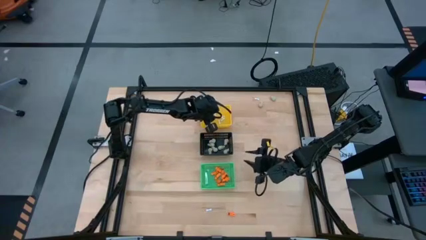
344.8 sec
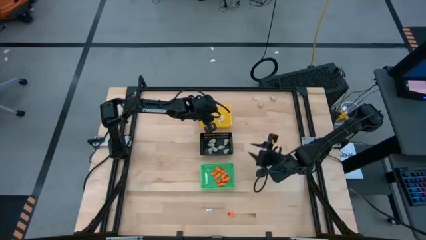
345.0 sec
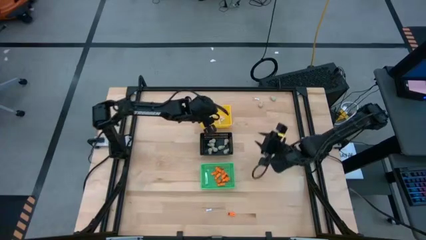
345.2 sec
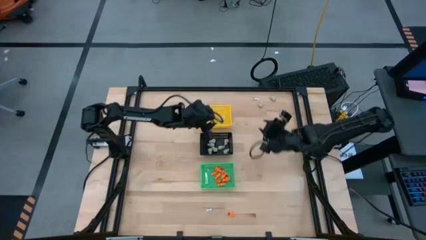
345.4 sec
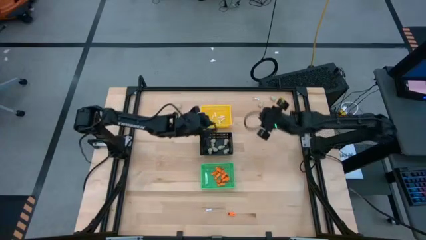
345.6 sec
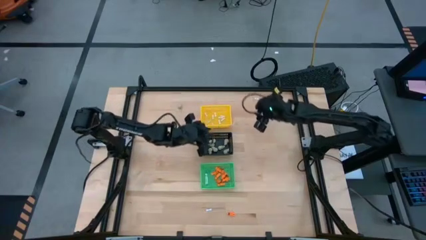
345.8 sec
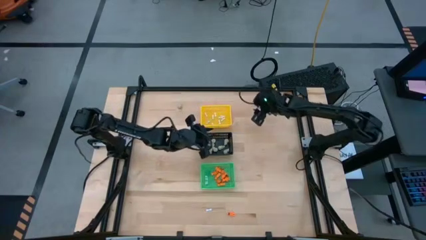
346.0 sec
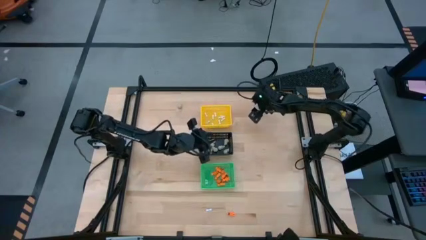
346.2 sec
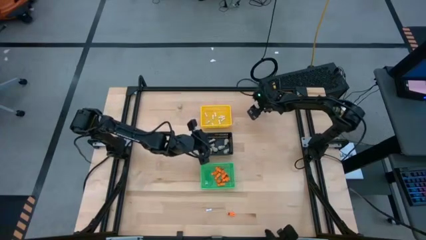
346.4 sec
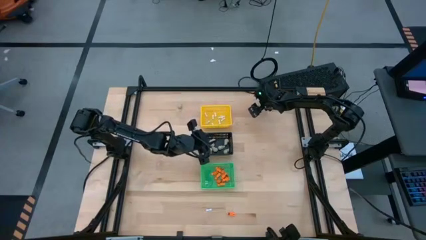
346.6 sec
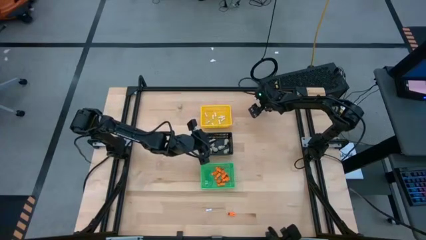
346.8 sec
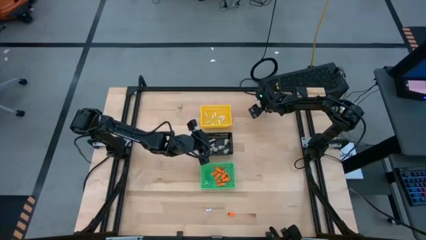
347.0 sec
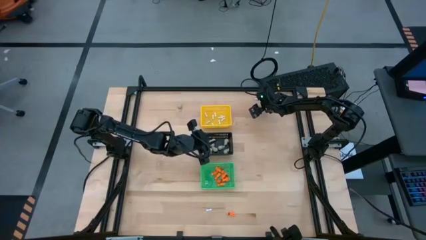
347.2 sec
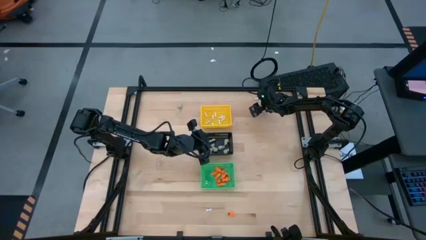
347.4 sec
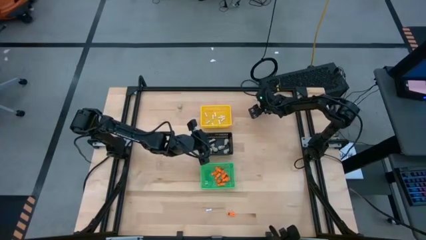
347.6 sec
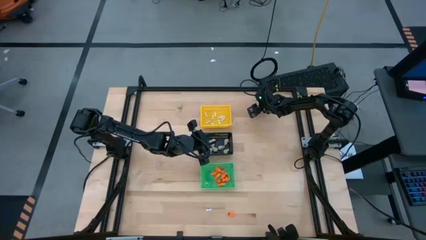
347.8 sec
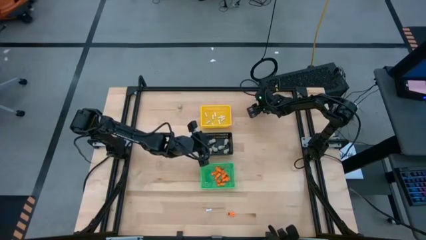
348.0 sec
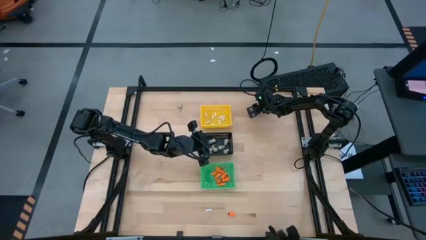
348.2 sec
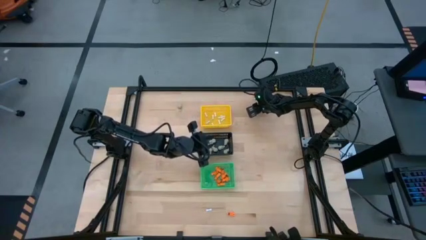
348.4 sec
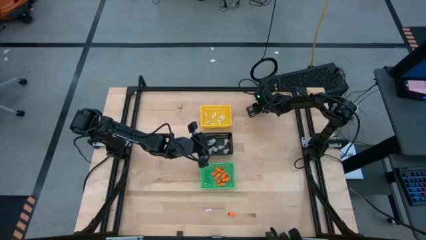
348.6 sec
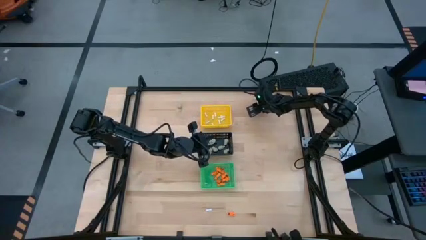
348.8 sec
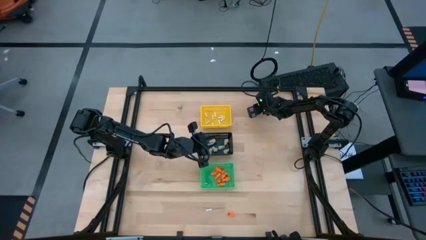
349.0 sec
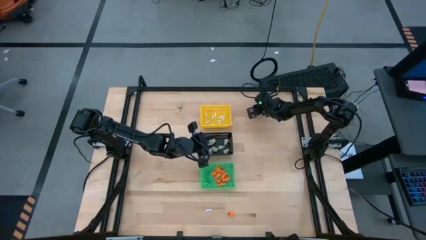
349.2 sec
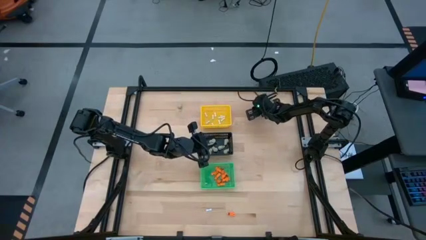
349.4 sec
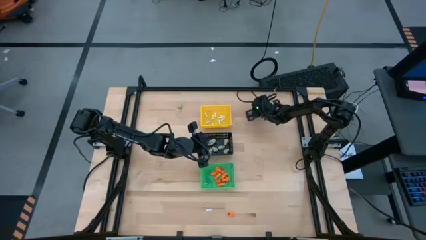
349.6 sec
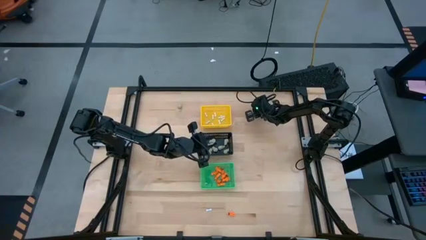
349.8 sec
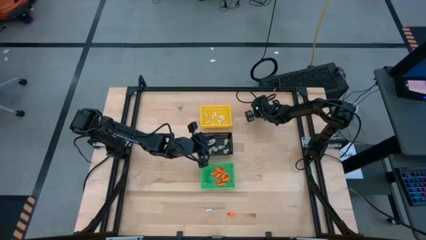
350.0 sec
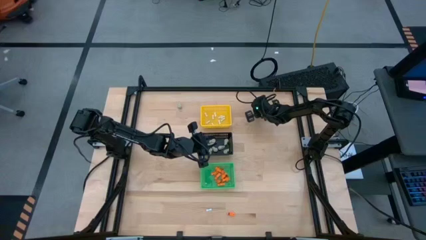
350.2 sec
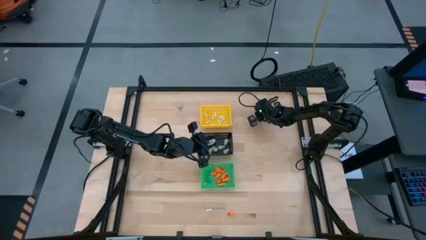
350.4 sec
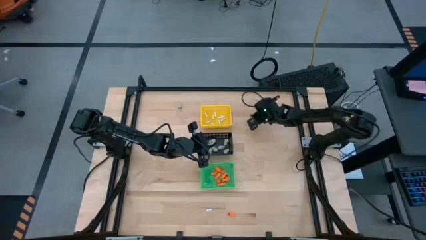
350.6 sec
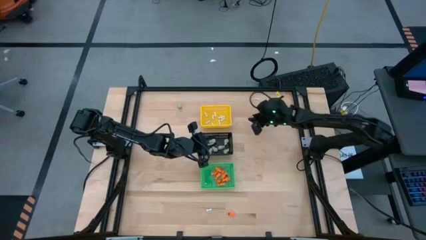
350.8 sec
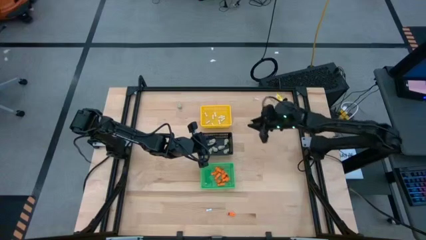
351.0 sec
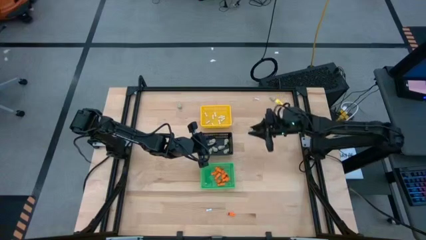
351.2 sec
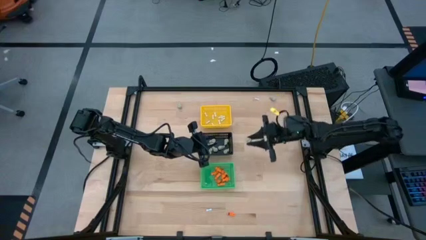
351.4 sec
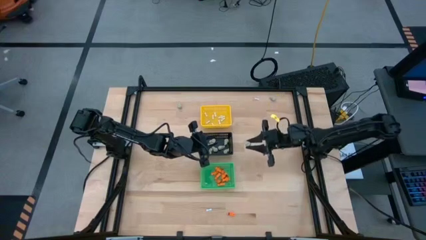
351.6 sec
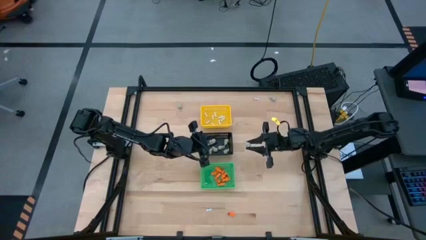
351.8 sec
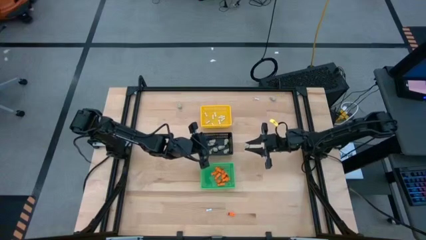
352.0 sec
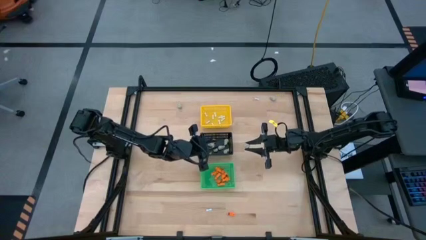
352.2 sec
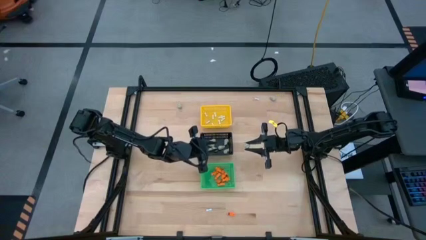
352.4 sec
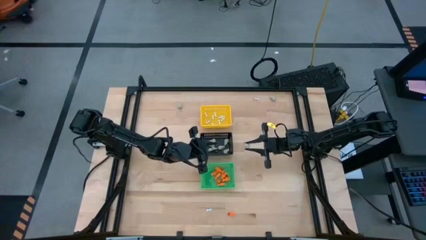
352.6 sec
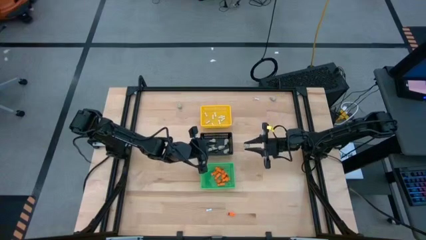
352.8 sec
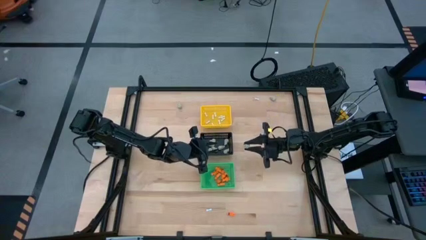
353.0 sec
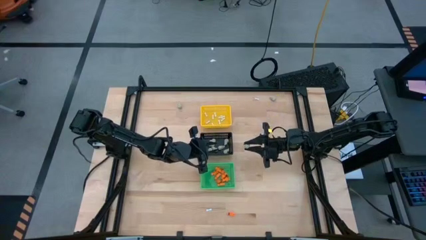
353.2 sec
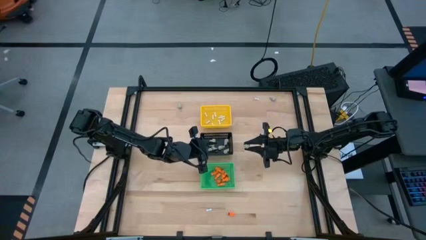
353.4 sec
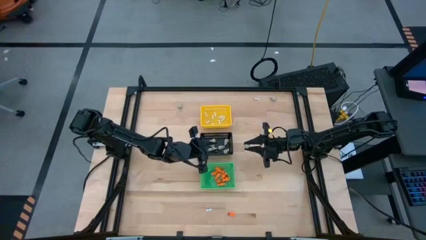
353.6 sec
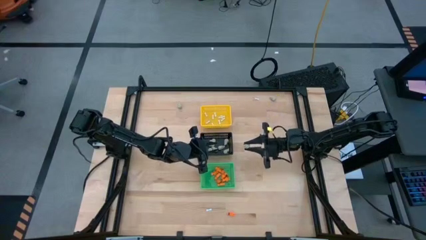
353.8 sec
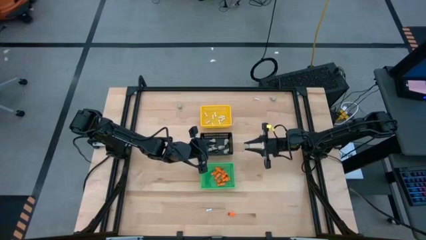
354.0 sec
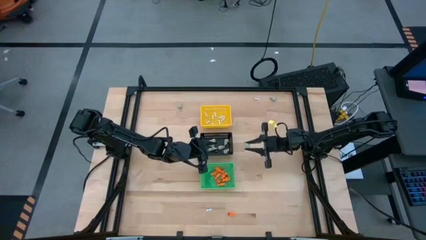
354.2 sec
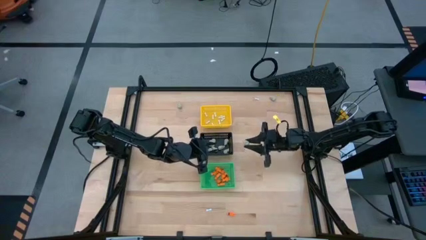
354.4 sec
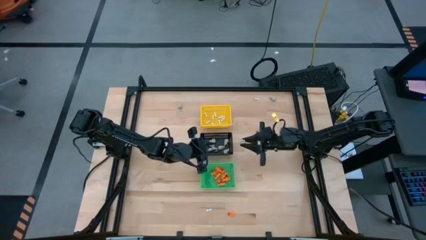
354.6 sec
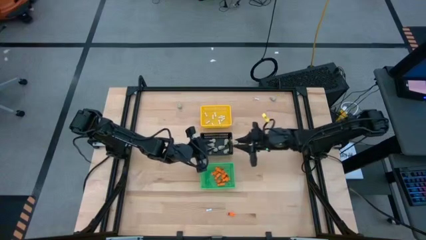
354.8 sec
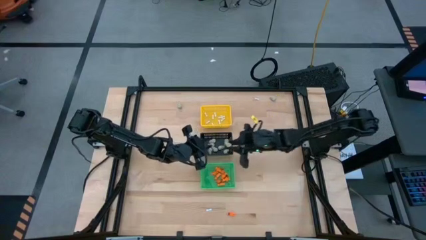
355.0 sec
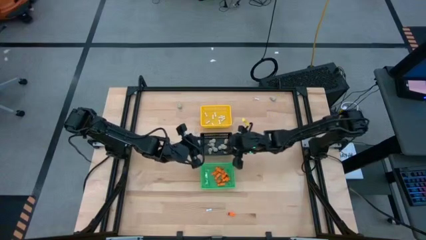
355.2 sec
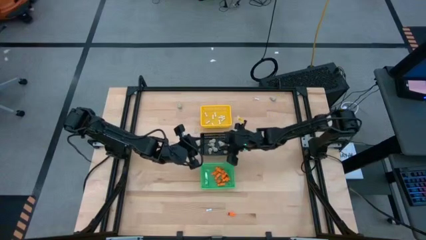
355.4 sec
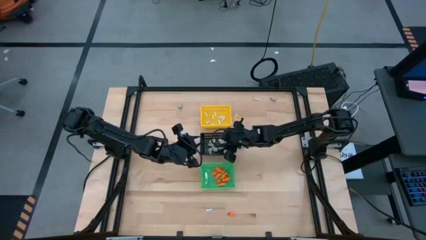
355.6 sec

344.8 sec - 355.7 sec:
Task: Sort Halloween decoration
Put the gray skull toy into the black basket
